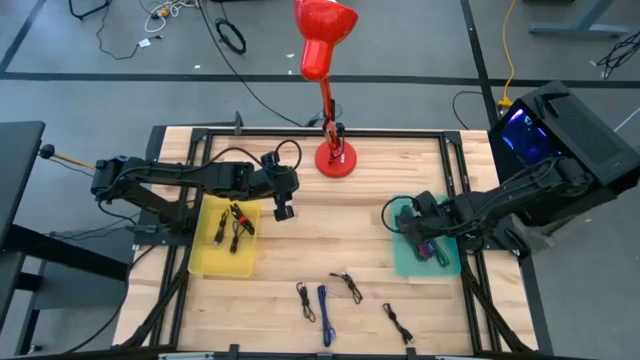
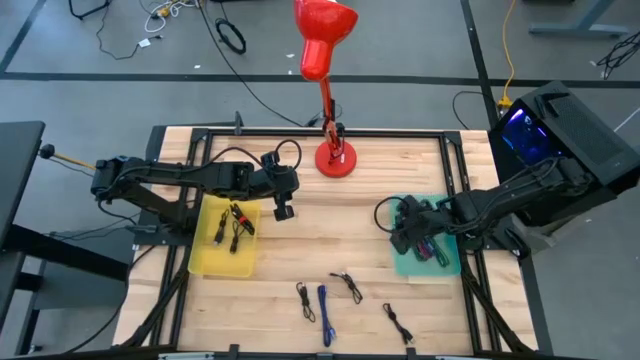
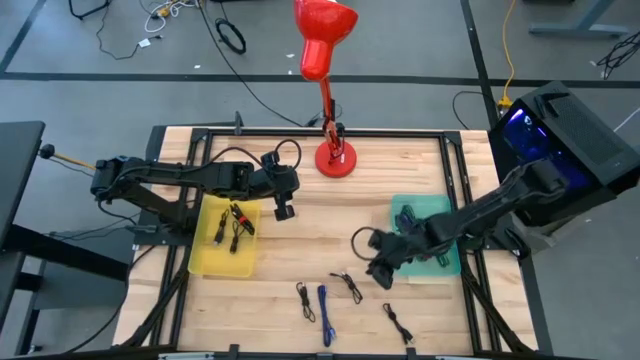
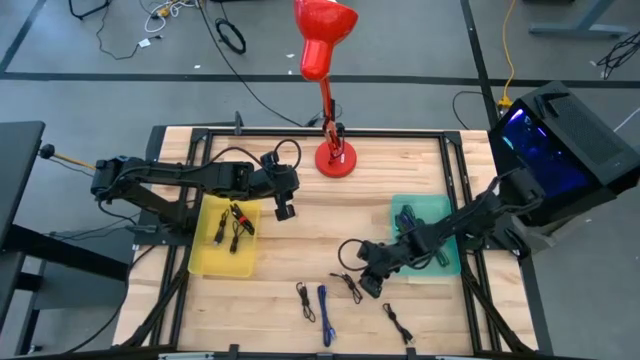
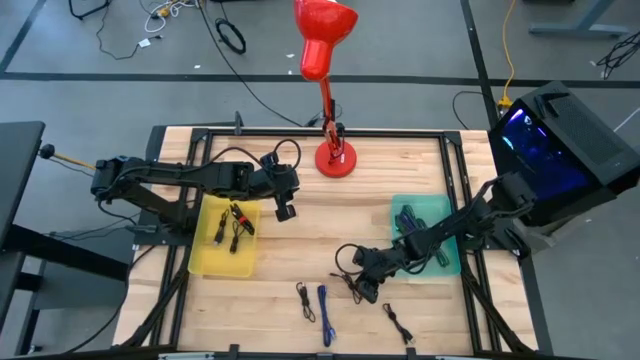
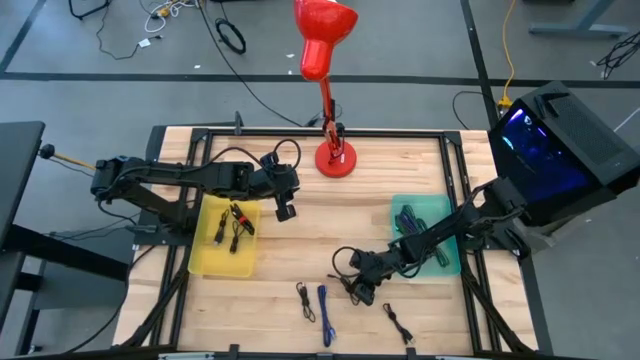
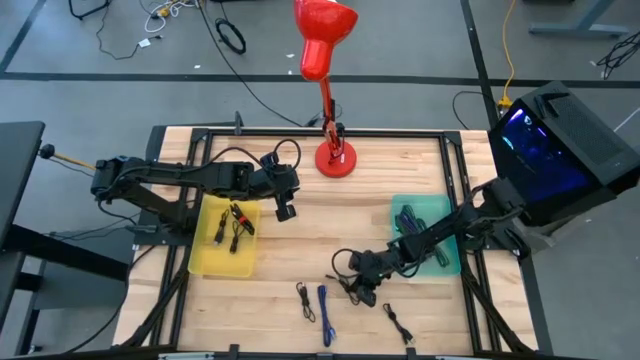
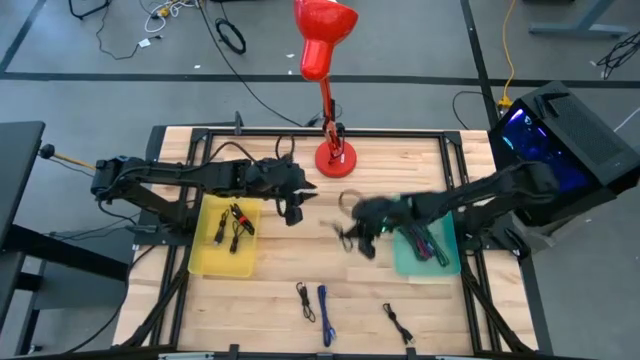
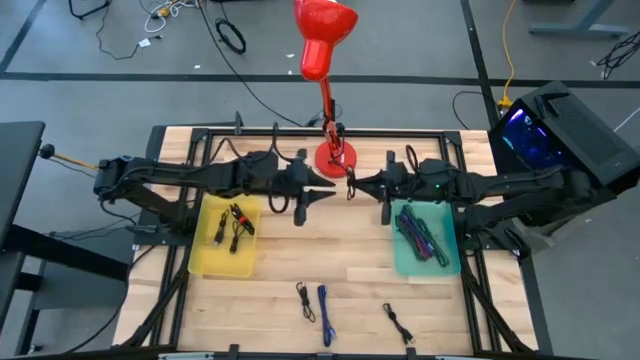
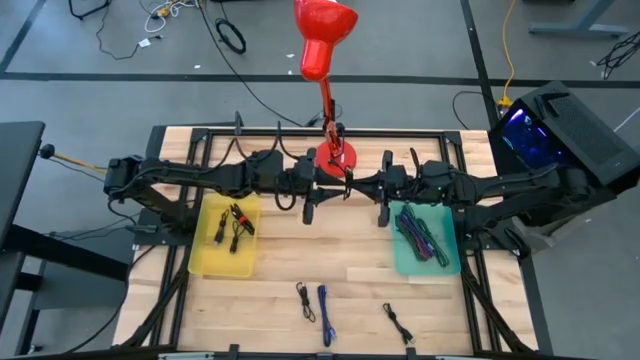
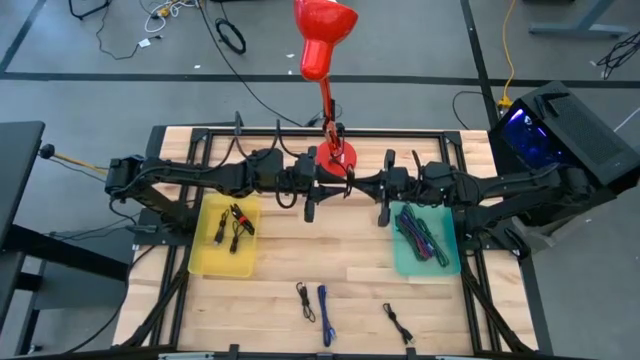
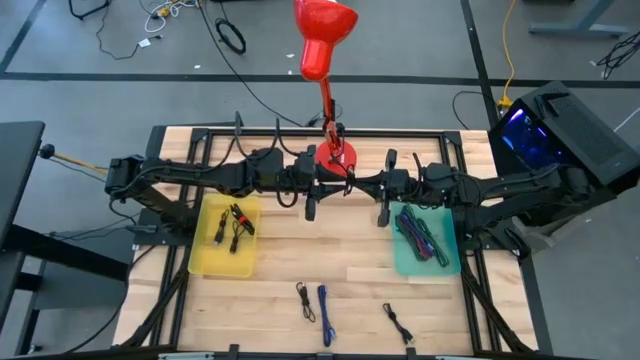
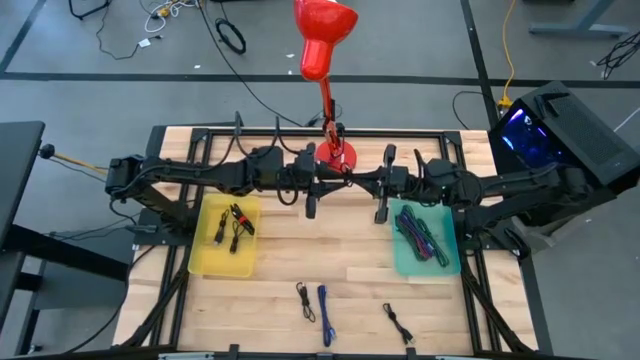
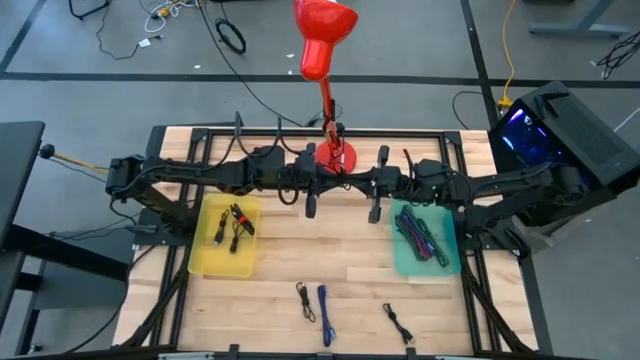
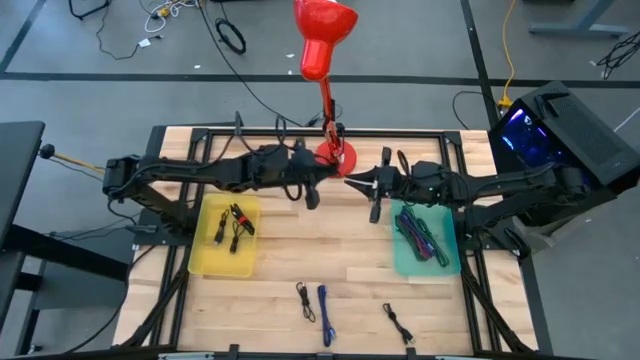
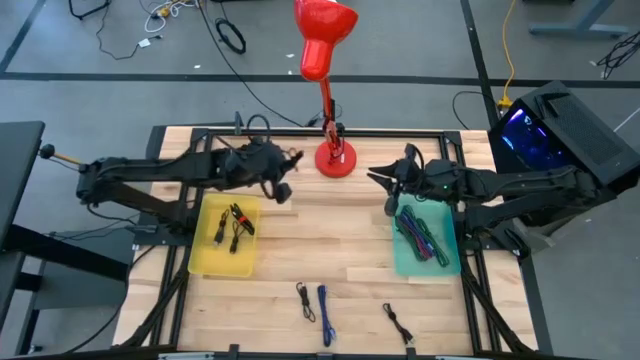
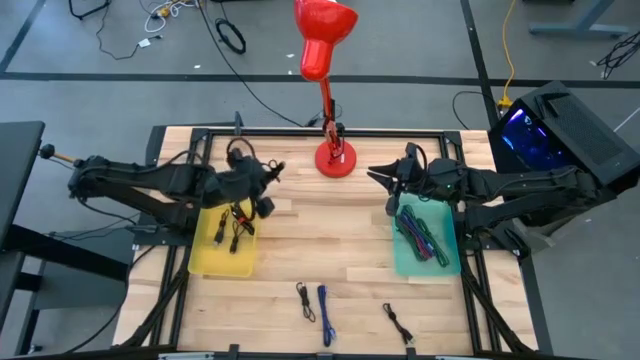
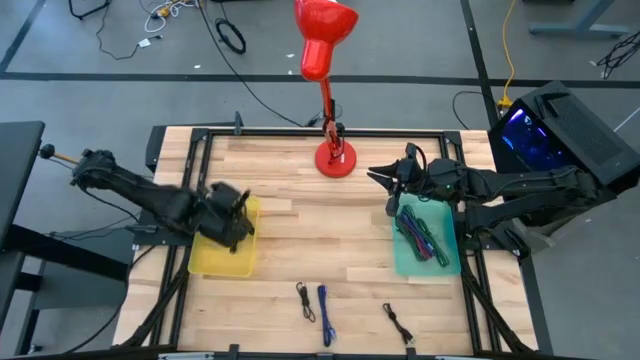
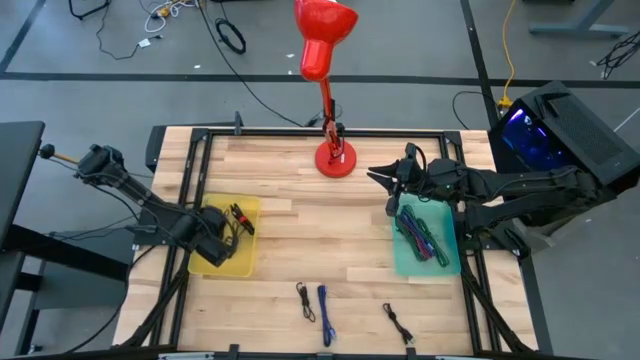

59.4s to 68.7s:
Task: Pick & Place USB Port
Put the black USB cable into the yellow transparent bin

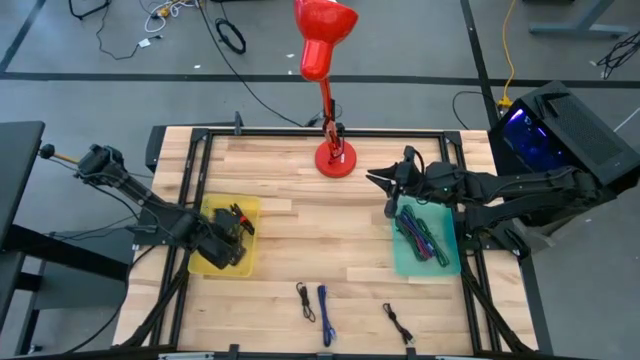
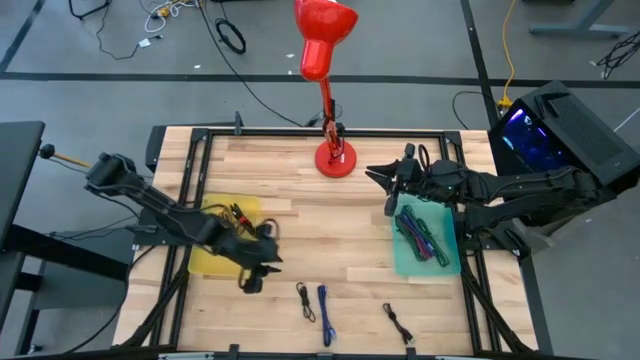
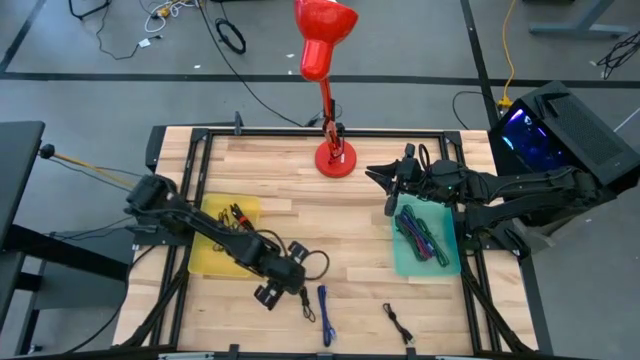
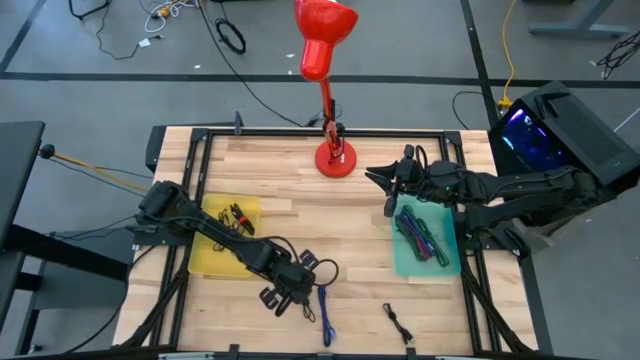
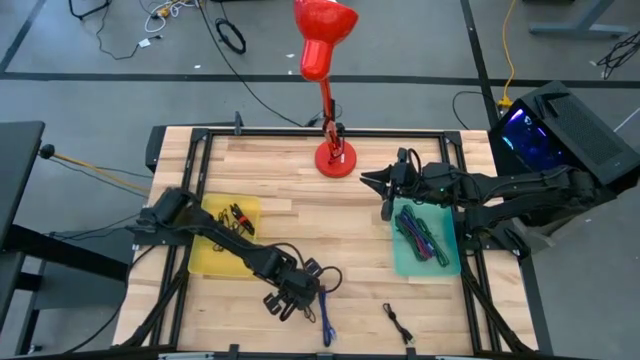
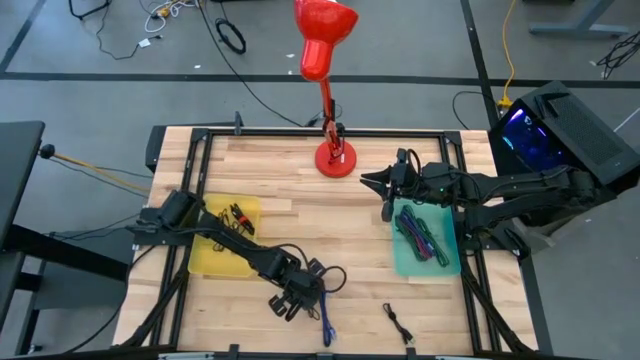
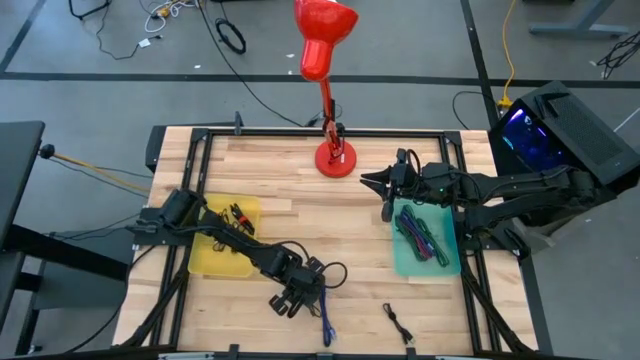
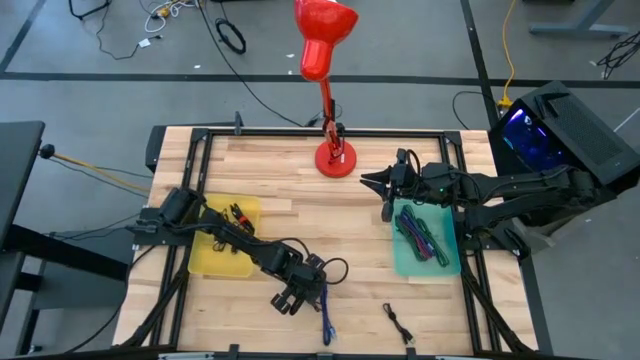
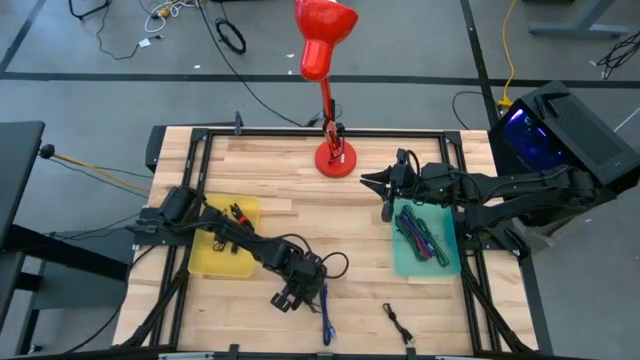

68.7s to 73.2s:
Put the black USB cable into the yellow transparent bin

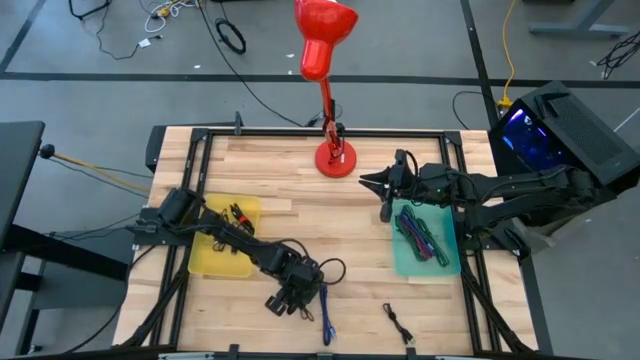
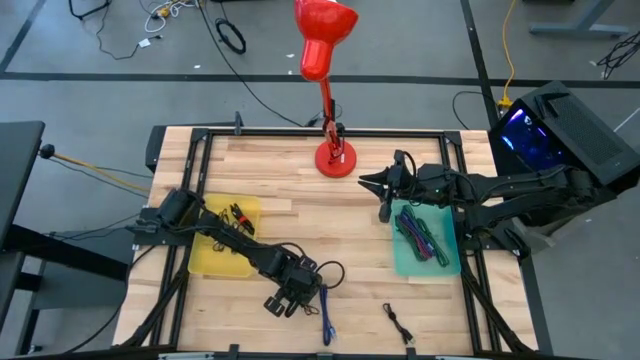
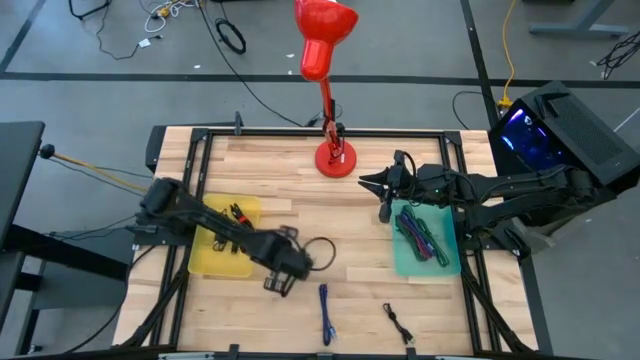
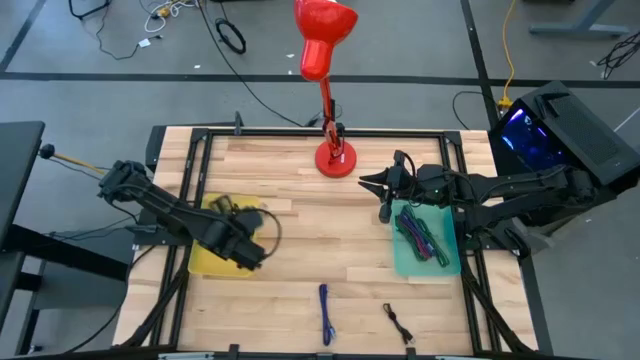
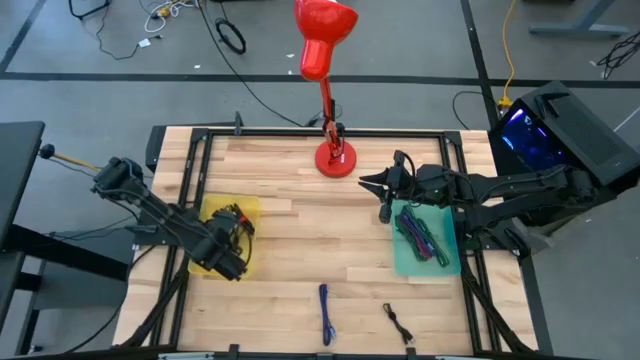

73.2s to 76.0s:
Put the black USB cable into the yellow transparent bin

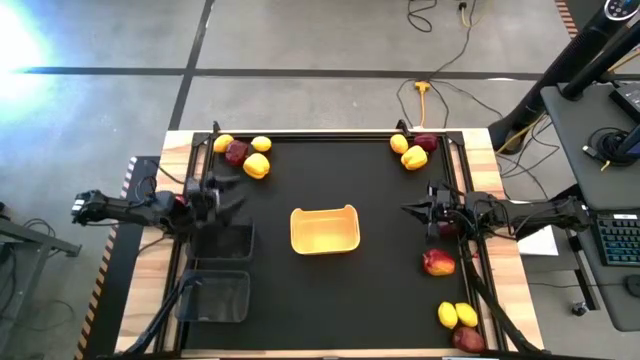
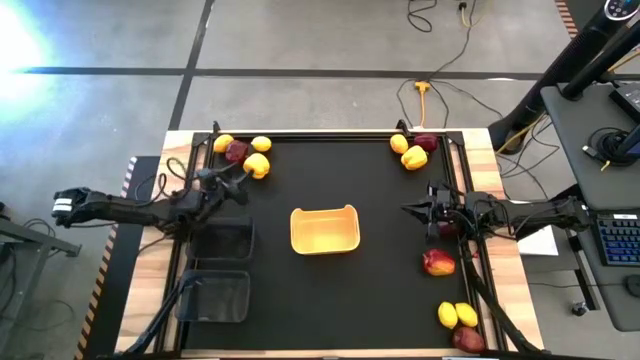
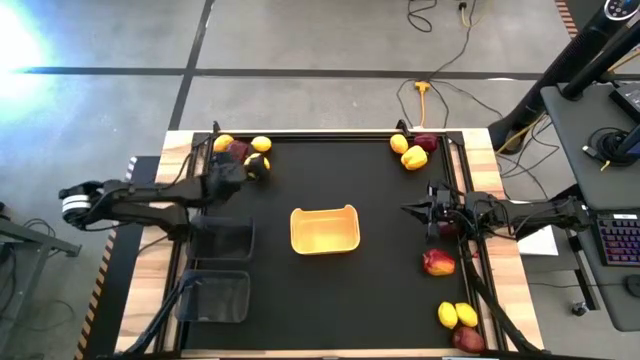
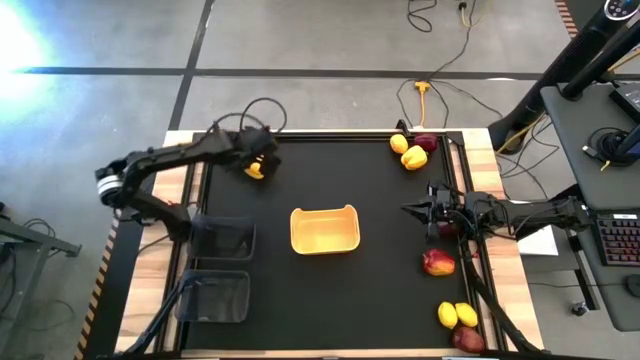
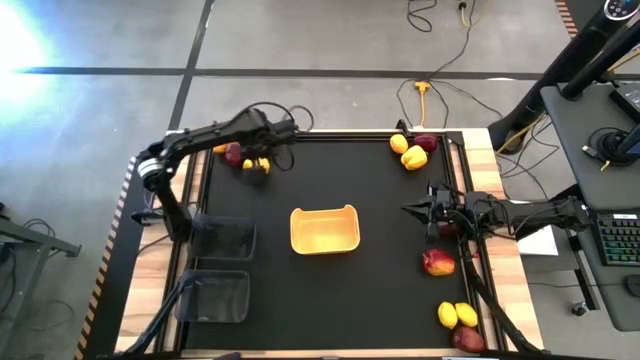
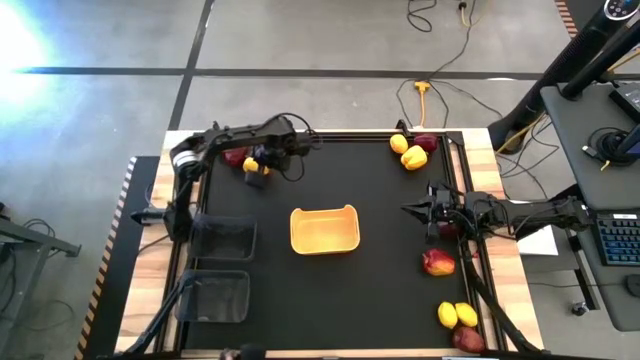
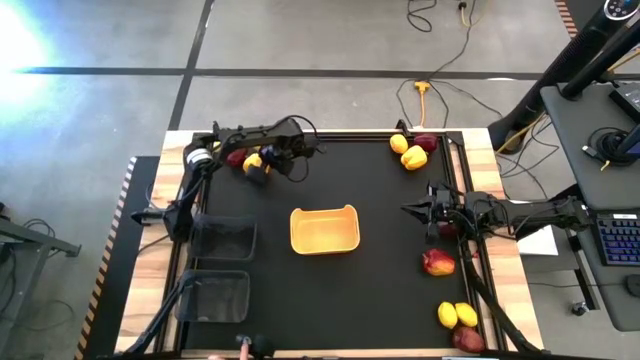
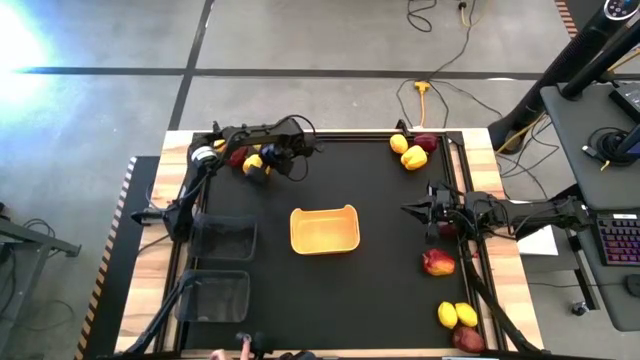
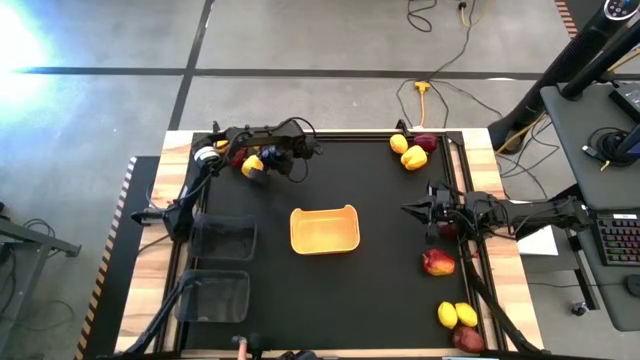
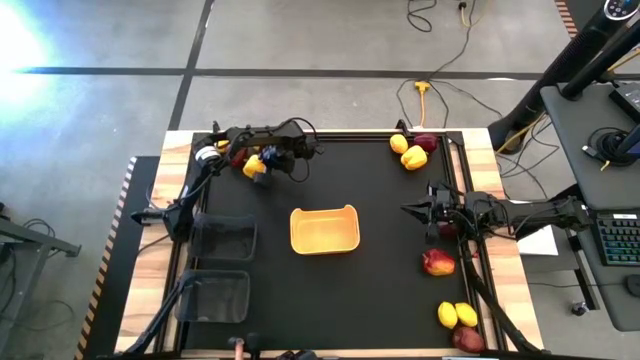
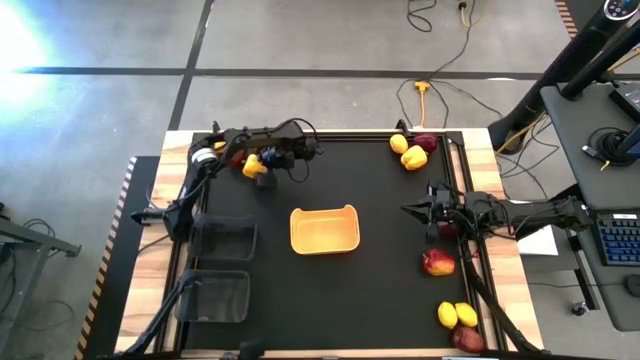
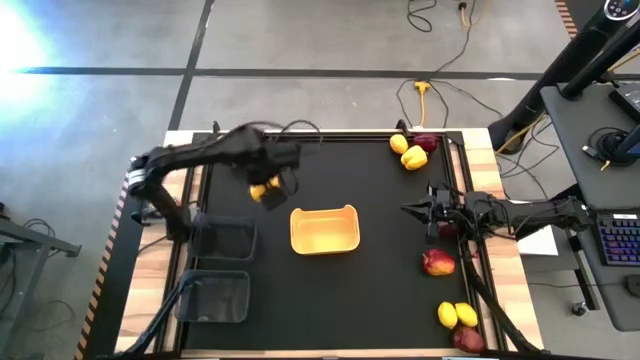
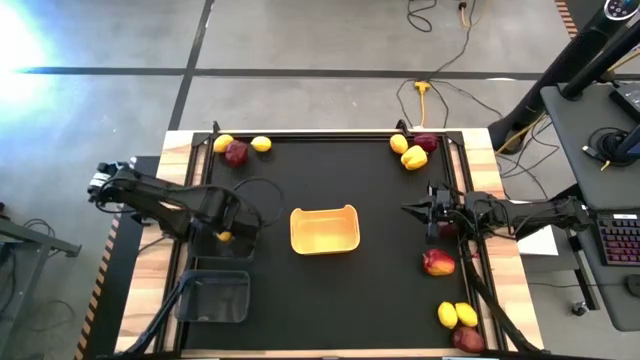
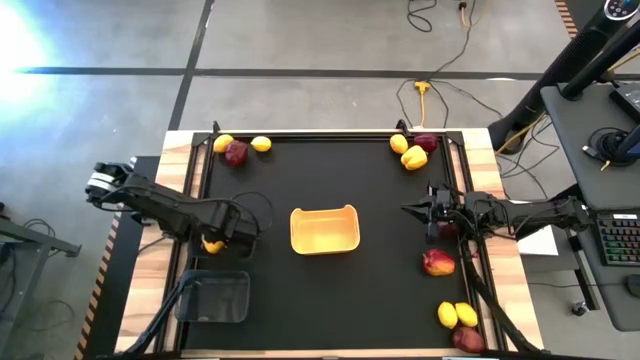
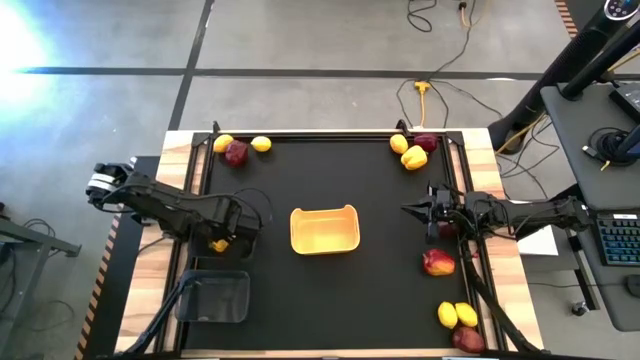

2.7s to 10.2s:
Task: Sort produce into baskets
Put the yellow bell pepper into the top transparent black bin
